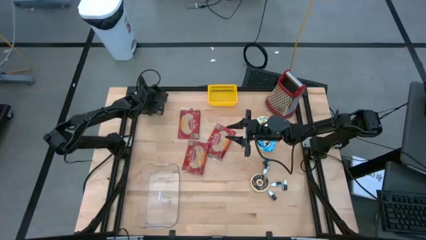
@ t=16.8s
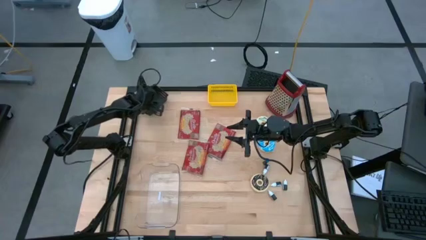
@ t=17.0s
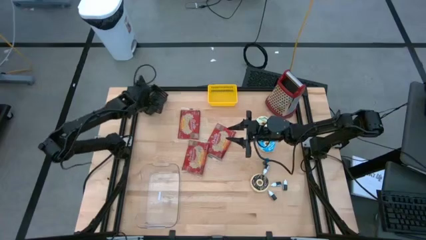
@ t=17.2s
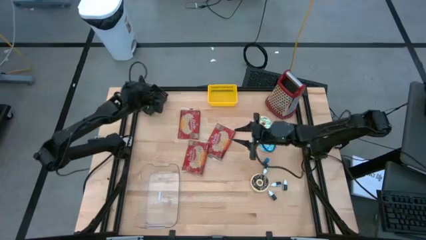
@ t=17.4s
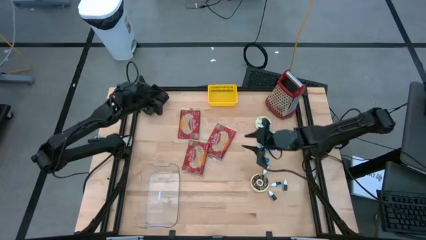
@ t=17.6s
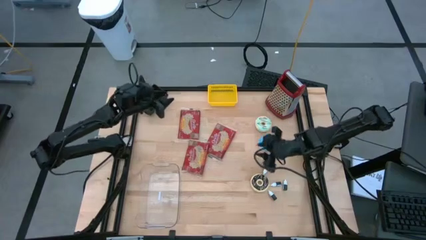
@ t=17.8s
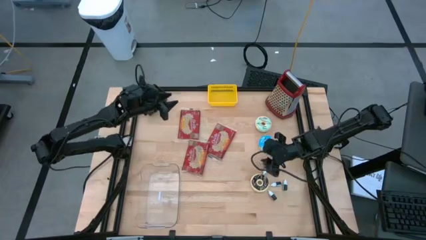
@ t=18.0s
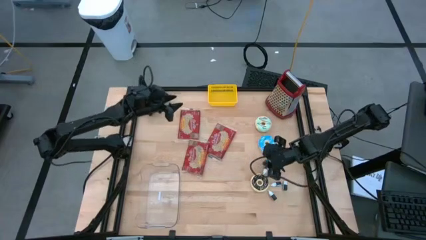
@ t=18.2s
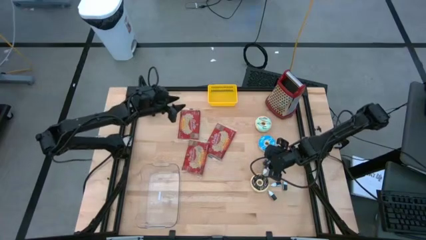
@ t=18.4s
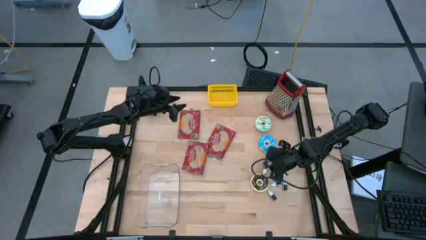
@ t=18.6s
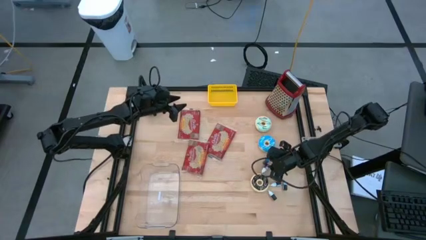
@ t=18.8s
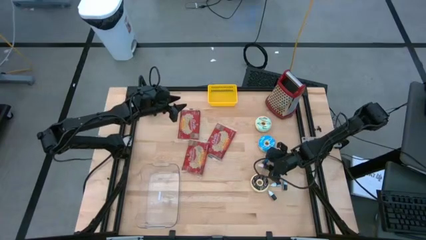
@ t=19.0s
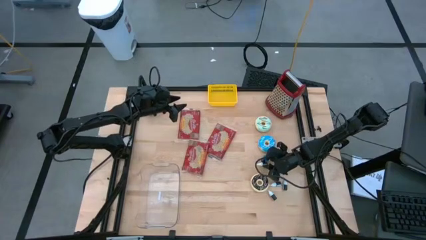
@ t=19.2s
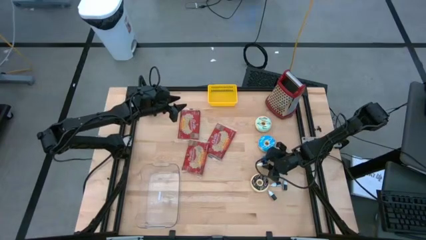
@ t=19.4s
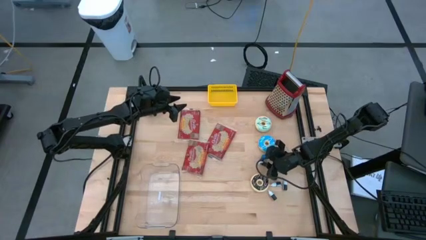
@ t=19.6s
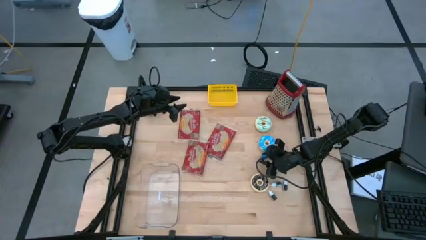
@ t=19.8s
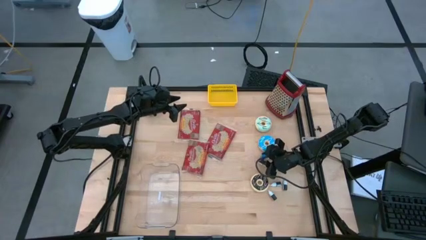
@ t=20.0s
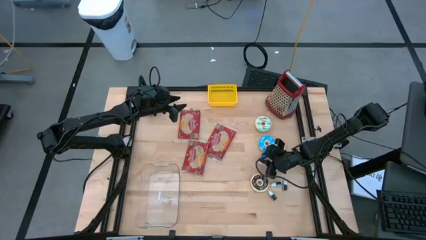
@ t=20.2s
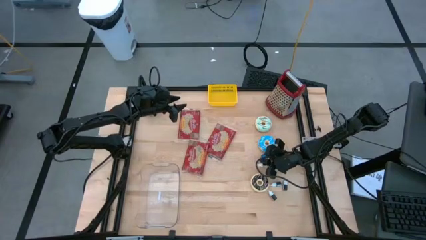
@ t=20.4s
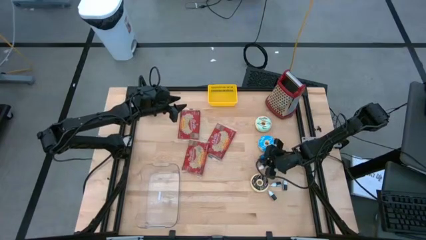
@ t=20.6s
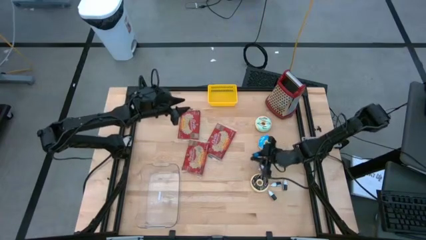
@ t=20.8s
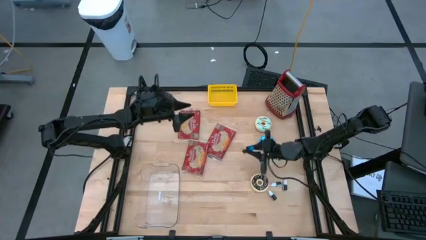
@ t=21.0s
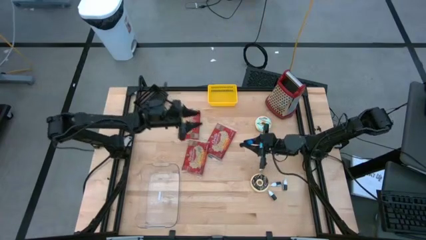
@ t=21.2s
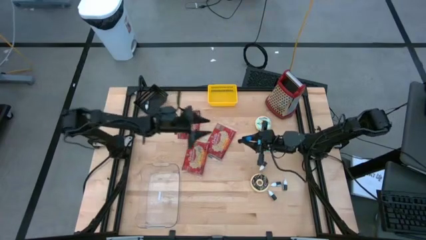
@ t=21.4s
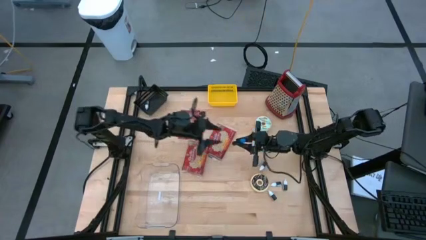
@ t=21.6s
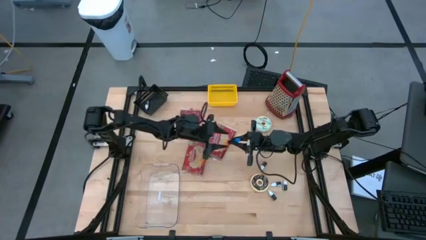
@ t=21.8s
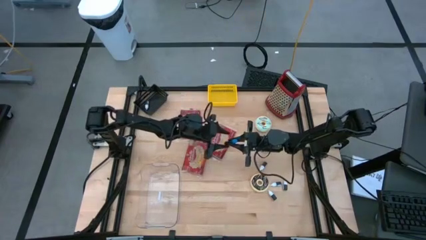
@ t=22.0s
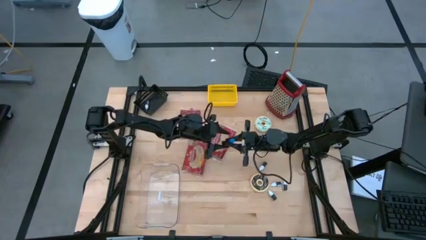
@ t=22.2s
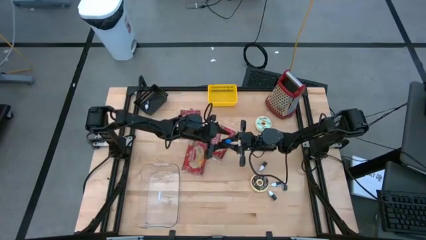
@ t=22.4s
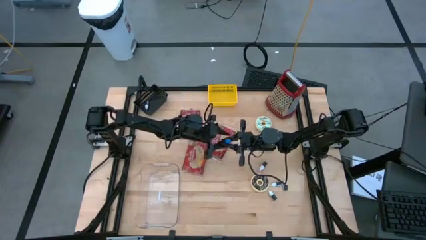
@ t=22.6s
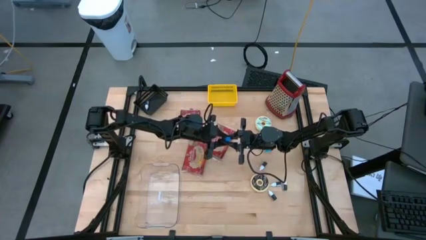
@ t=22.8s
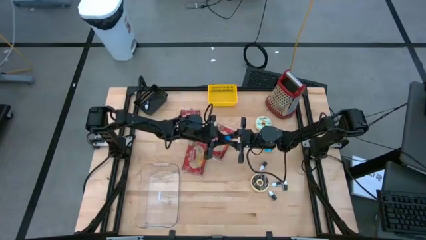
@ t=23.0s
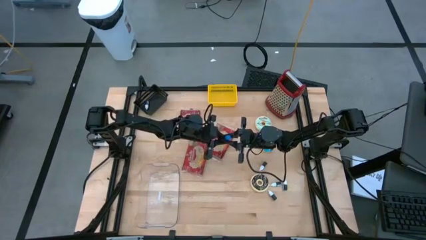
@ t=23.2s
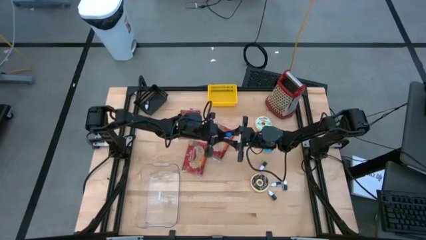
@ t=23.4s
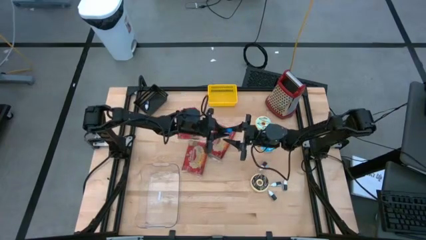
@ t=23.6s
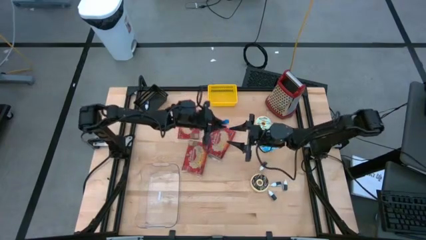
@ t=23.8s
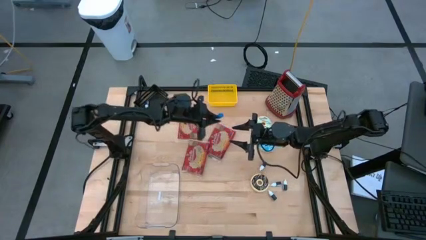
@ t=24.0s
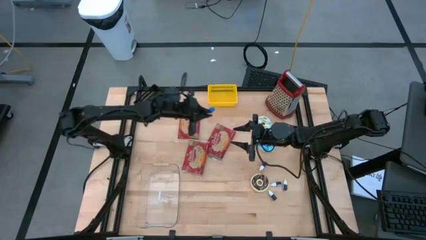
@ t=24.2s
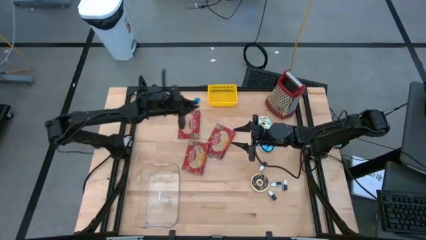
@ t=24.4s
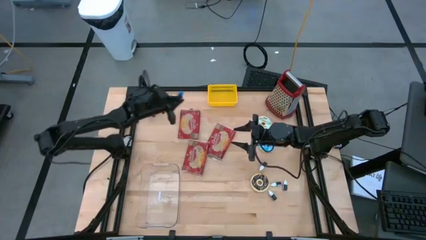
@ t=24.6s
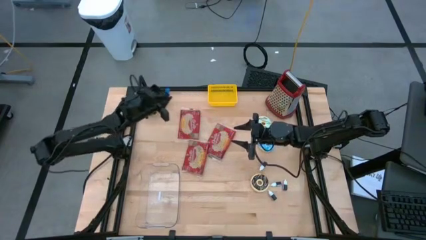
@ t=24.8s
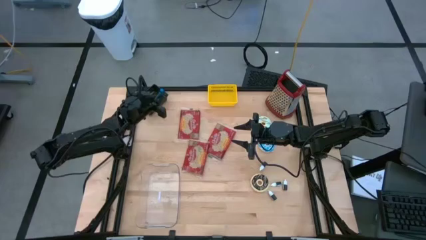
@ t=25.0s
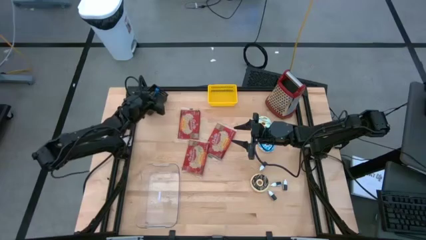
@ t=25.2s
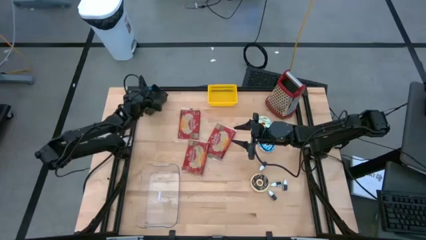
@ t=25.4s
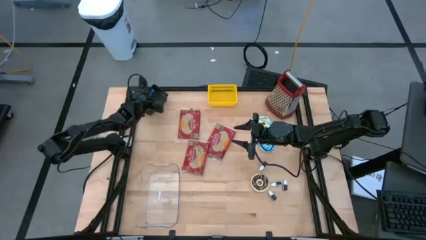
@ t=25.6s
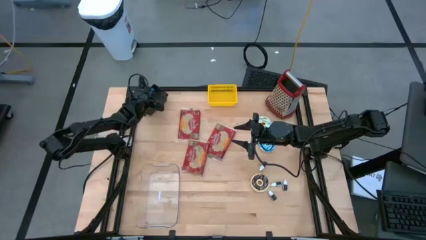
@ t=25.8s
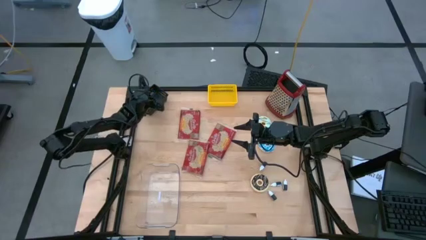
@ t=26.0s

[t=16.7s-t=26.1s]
Put the large blue food coloring bottle into the black bin

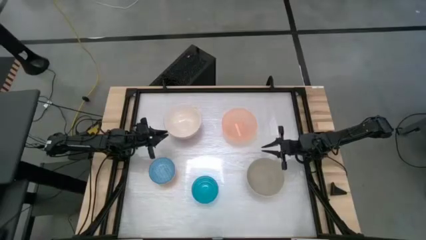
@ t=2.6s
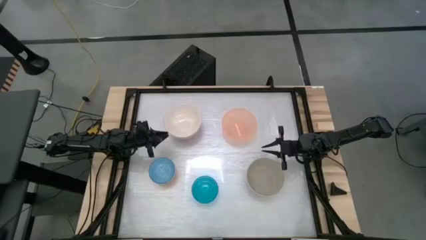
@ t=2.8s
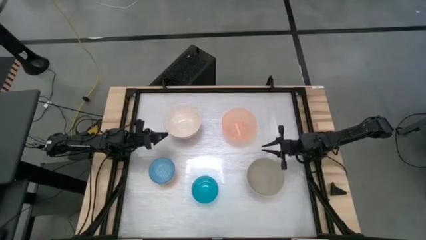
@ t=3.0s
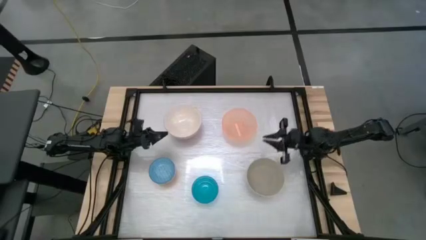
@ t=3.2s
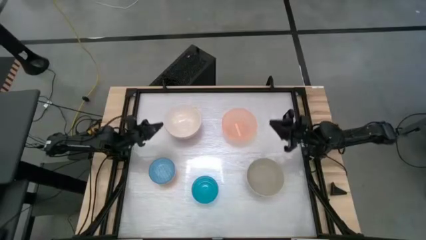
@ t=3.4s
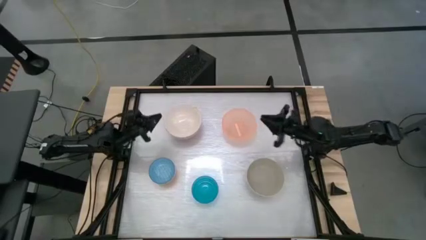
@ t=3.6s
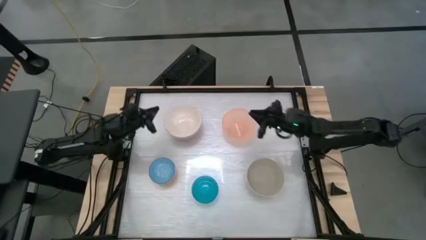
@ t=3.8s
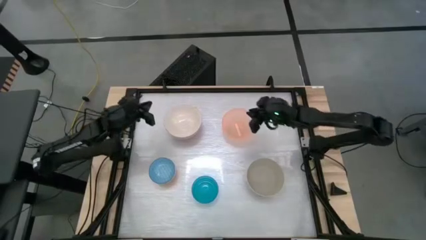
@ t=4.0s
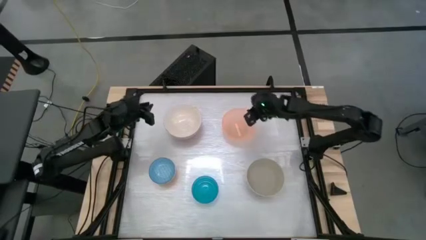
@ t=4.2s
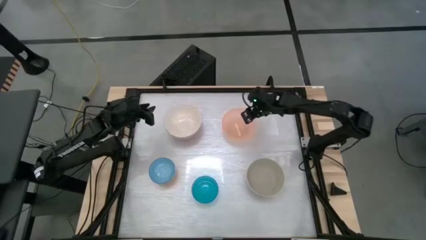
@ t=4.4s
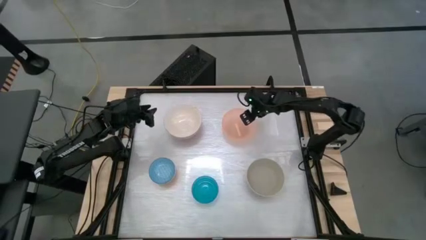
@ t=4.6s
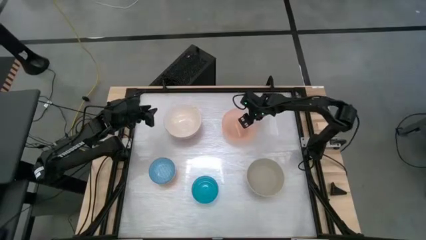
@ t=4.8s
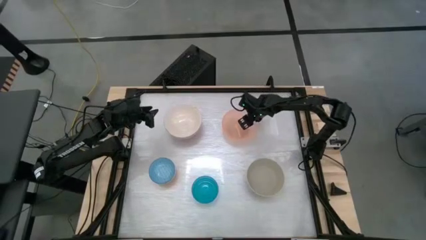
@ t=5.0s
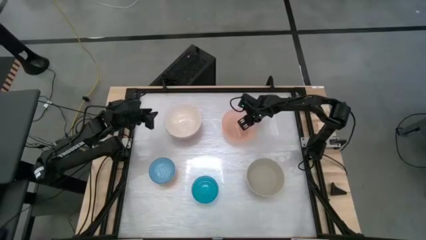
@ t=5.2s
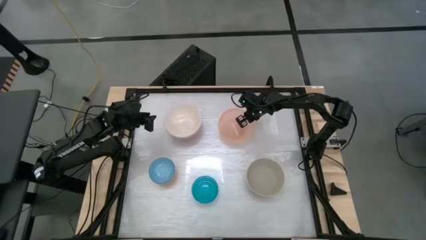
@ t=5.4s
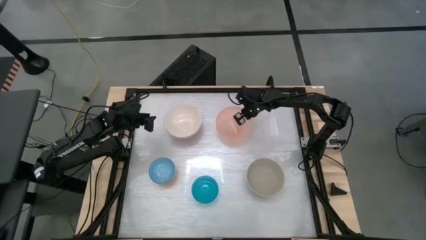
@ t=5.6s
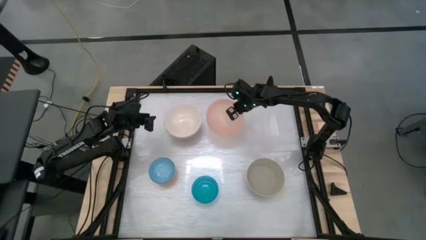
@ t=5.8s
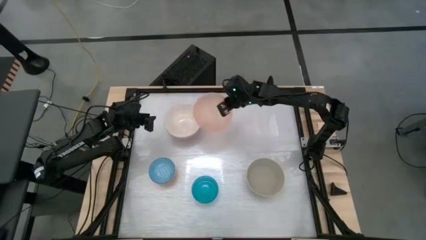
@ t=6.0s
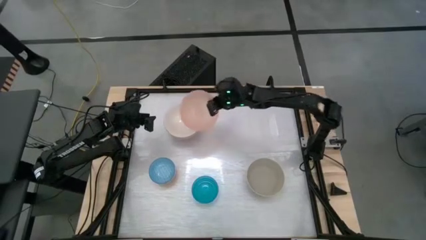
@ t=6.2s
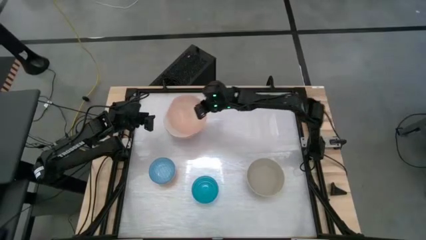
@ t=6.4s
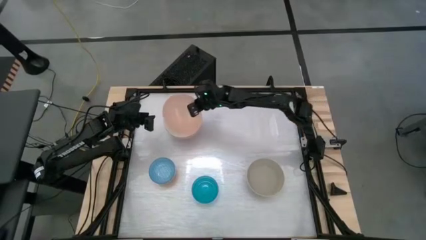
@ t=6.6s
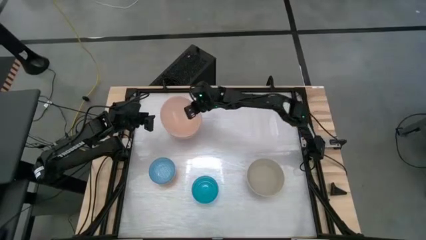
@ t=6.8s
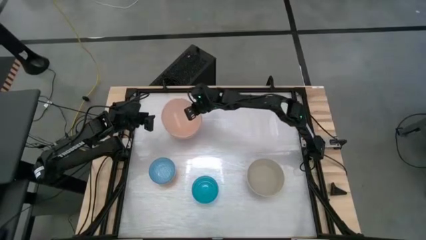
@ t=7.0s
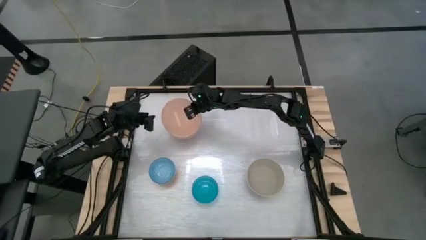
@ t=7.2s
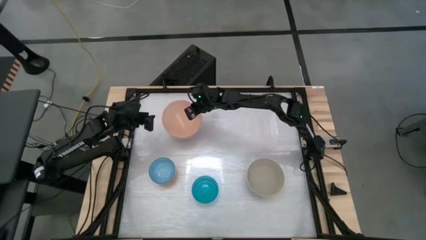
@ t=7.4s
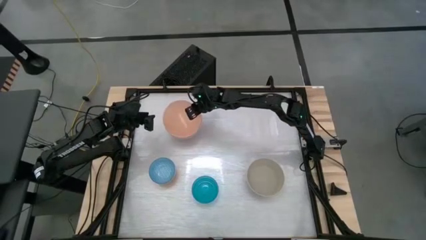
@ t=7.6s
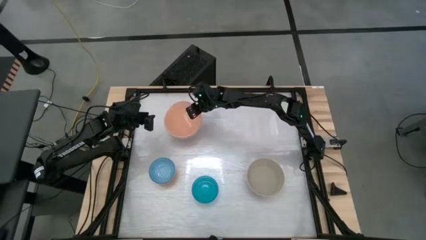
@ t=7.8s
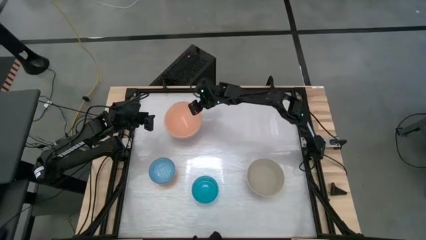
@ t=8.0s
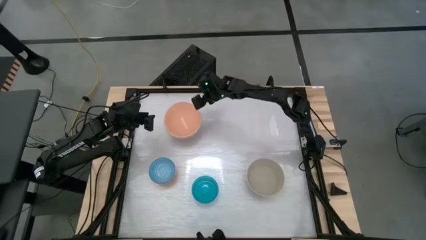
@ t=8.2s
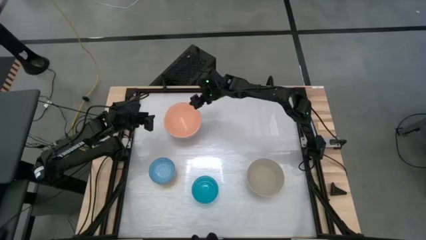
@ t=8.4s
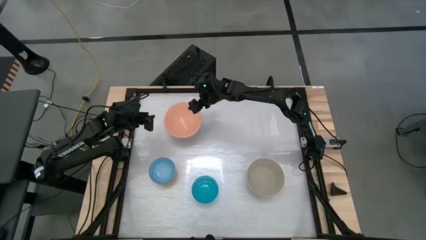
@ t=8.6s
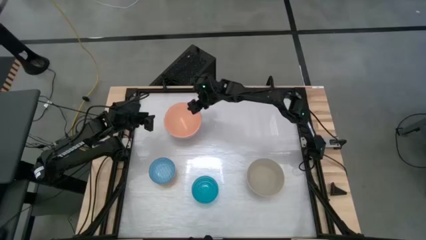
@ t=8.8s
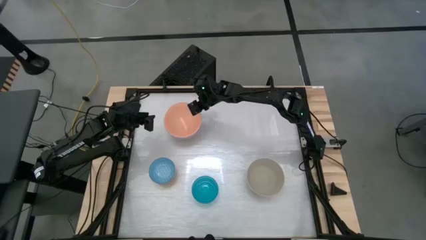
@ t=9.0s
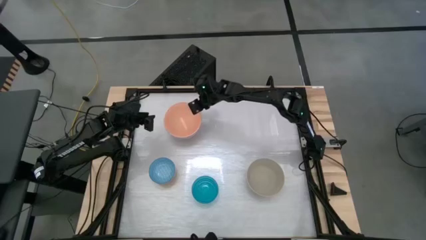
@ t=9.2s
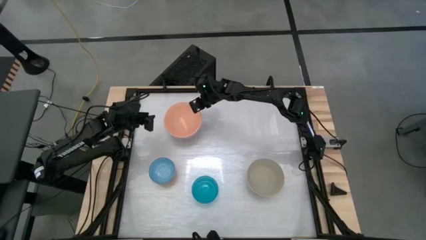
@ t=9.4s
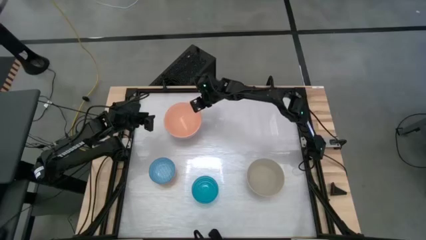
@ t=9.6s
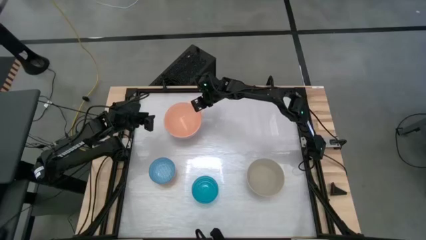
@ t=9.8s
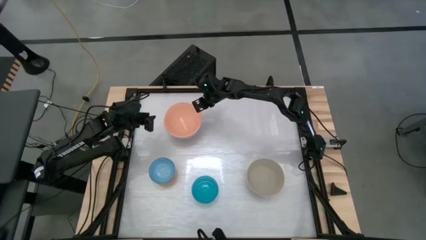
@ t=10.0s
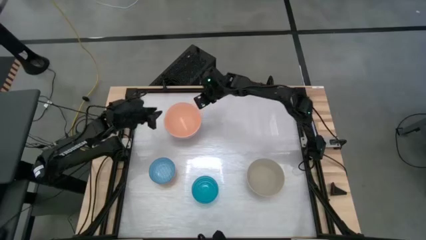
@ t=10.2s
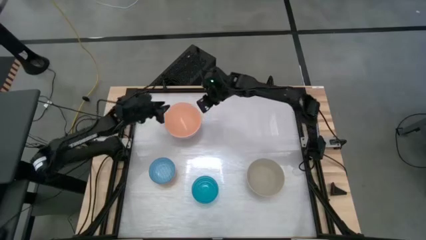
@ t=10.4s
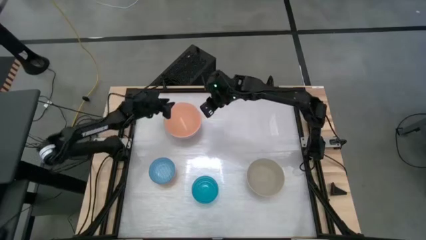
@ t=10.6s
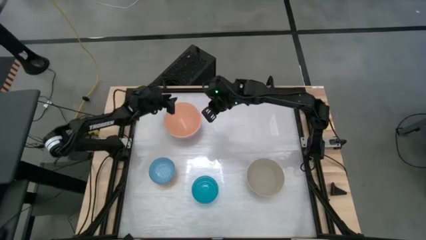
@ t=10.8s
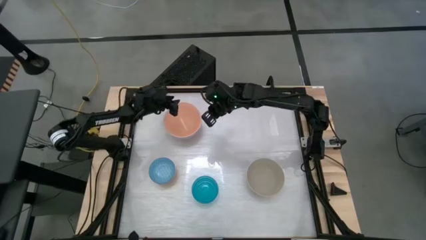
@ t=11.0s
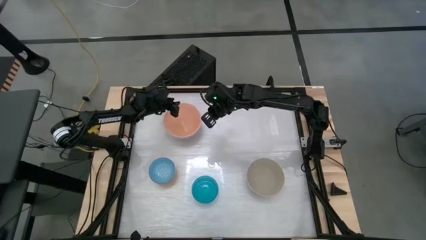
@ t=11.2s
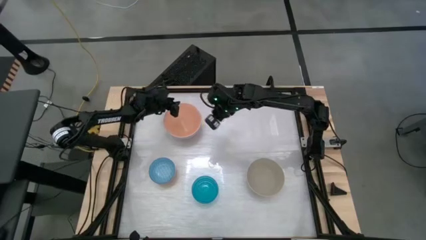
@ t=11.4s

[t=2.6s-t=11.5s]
Stack the orange plastic bowl on top of the pink ceramic bowl
